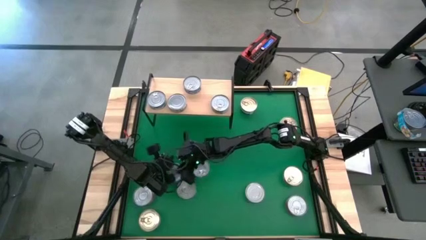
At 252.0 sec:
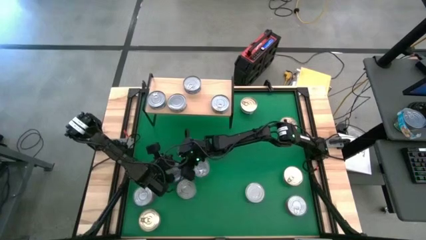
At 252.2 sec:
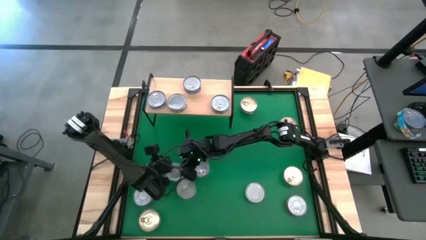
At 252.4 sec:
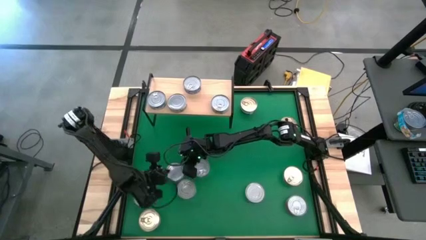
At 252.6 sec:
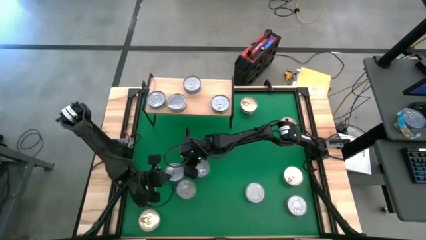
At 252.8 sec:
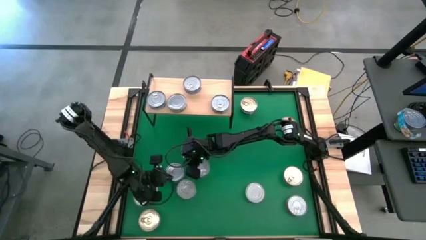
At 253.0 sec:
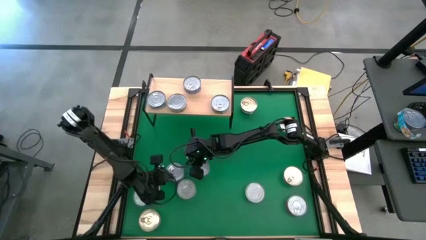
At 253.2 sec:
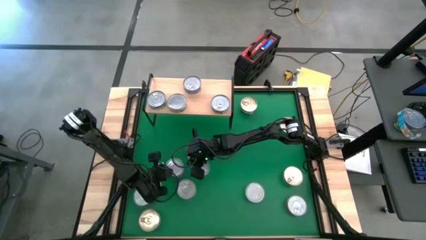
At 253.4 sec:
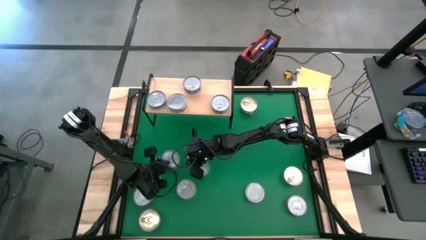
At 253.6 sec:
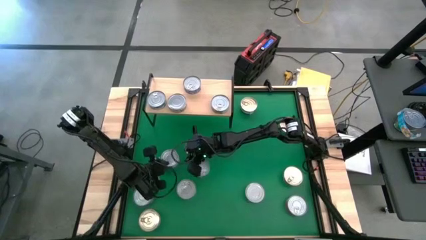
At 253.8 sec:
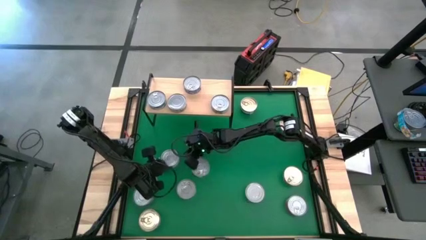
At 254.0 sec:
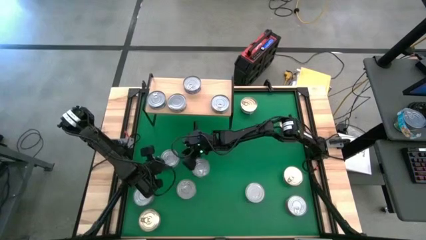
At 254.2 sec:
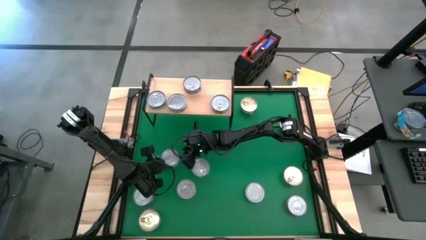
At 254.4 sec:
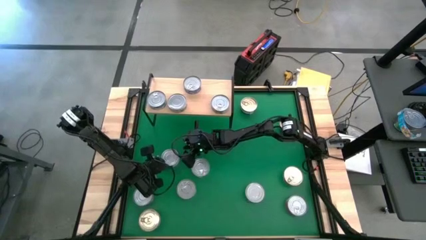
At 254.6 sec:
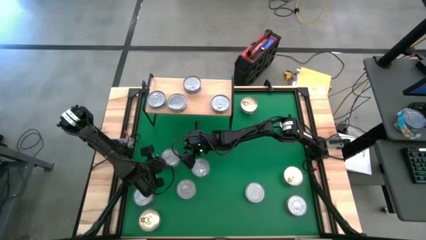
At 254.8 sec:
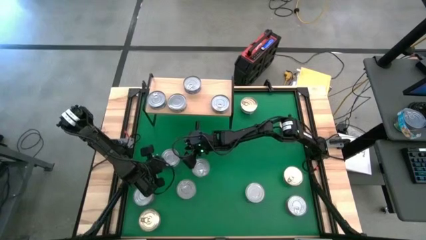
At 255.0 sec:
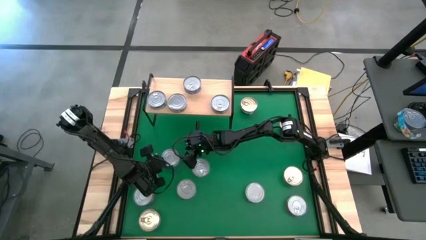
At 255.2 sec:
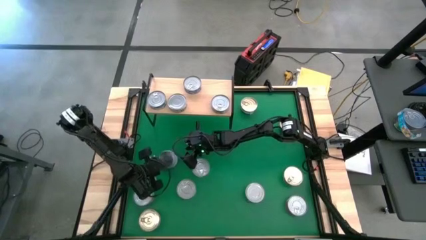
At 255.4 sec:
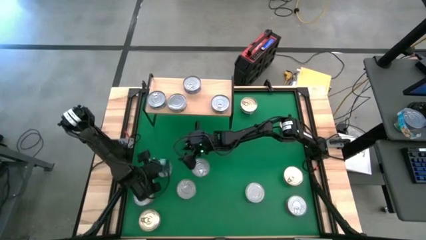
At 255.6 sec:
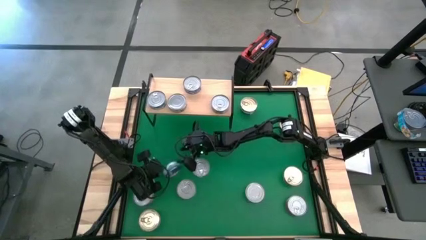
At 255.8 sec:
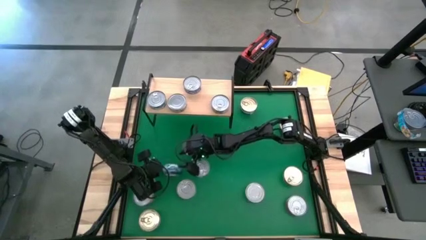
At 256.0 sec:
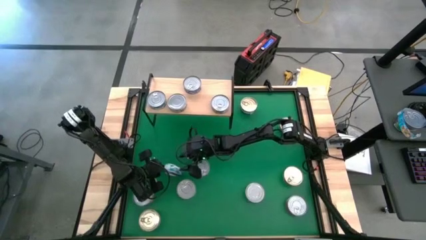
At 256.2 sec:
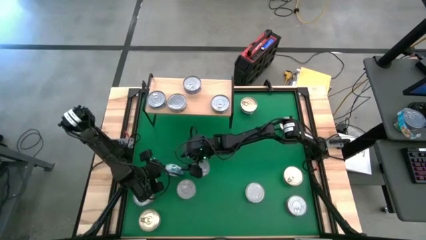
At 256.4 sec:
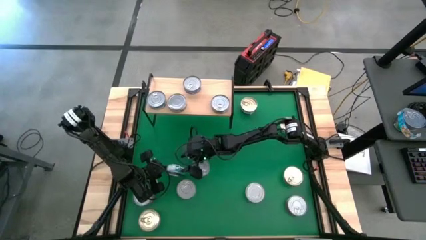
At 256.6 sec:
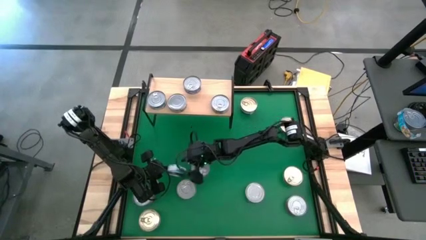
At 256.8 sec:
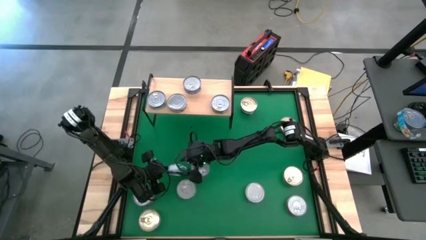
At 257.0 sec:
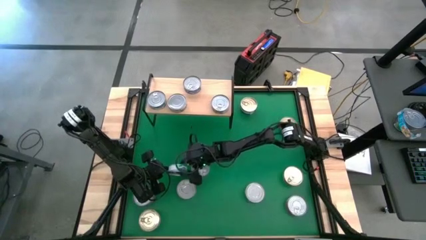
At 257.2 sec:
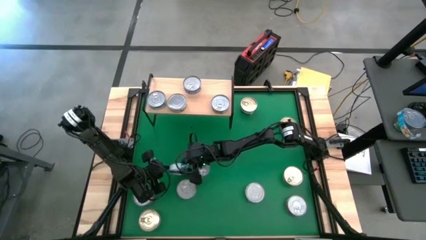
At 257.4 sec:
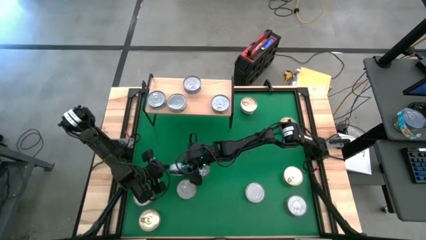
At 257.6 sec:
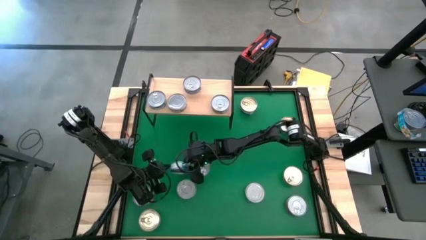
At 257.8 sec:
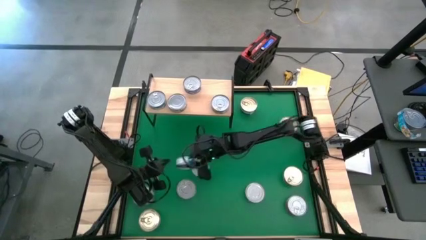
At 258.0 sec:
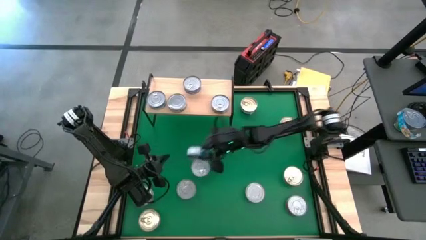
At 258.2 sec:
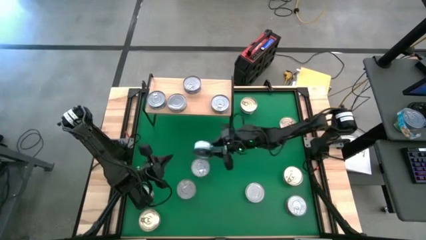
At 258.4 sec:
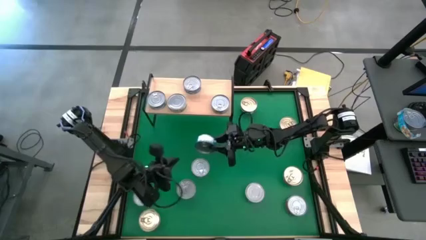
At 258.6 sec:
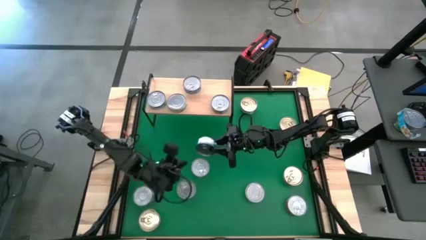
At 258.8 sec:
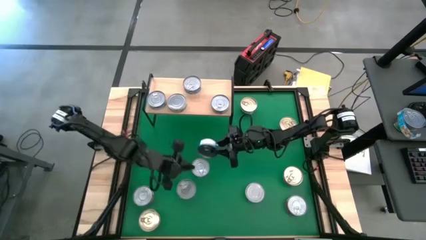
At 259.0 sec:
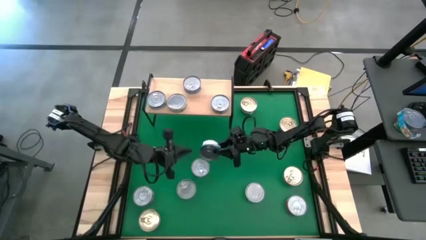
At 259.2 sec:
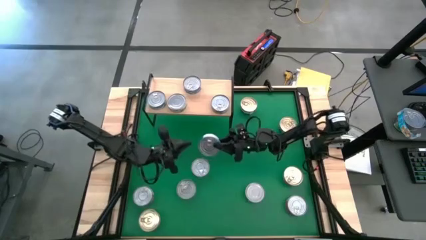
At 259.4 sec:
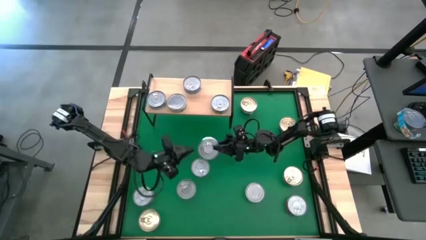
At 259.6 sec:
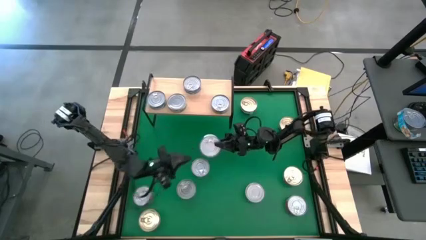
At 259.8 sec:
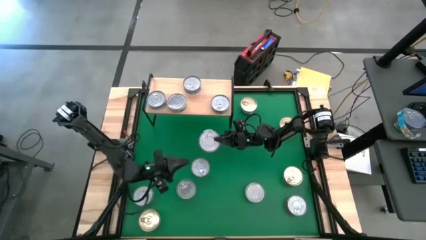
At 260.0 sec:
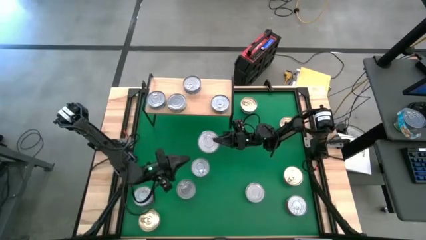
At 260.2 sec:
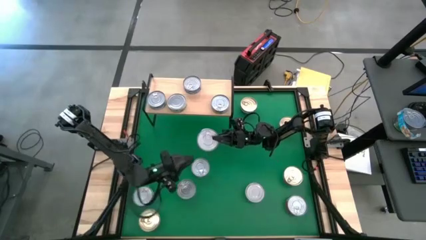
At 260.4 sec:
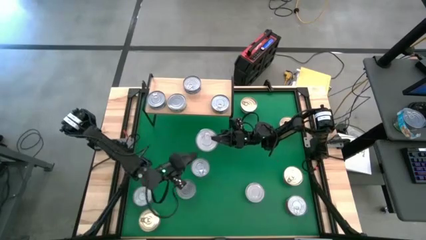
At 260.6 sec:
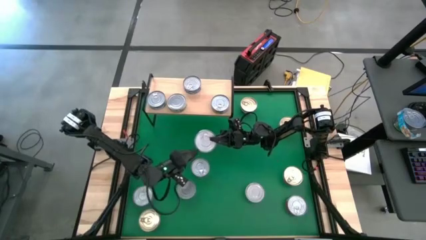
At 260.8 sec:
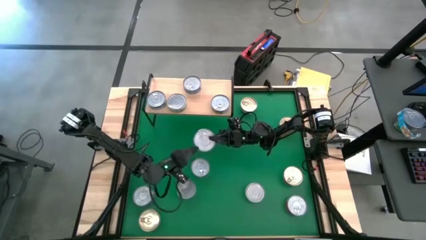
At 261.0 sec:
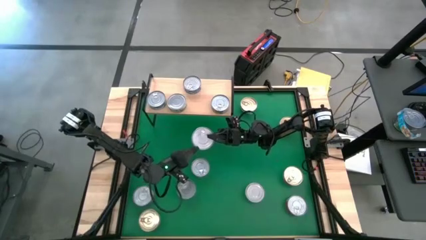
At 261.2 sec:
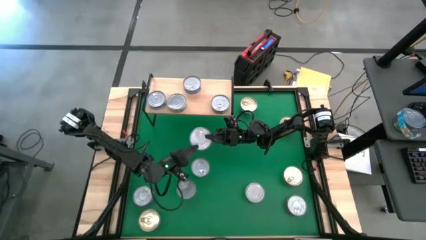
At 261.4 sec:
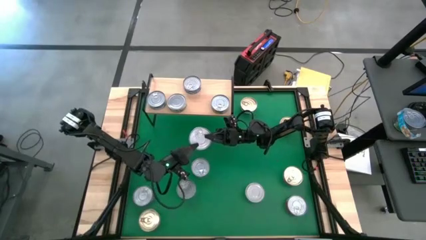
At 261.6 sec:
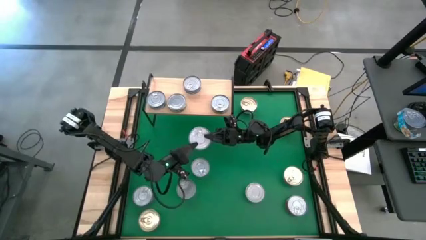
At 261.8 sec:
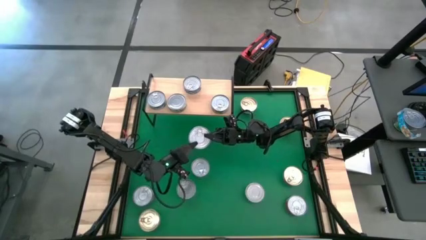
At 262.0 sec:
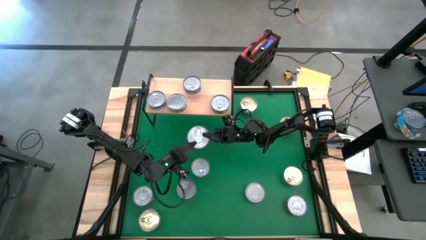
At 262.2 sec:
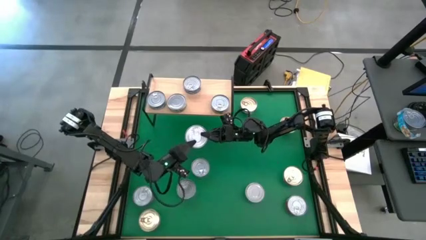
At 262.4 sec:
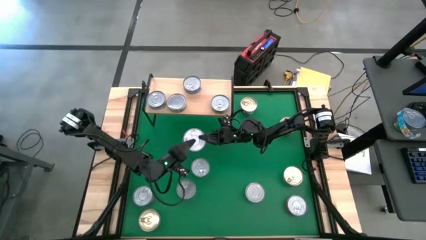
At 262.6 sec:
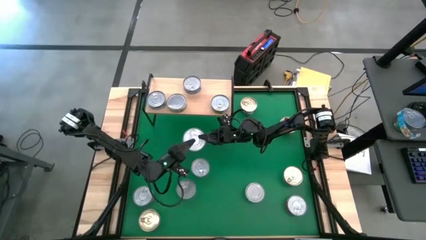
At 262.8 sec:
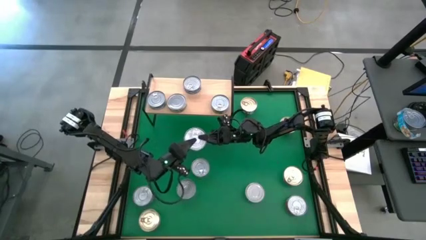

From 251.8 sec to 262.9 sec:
Task: Stack canned seafood by type on shelf
Stack the center light blue tuna can on top of the light blue tuna can on the shelf
